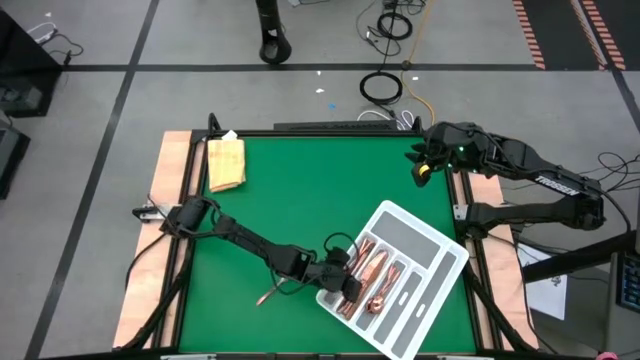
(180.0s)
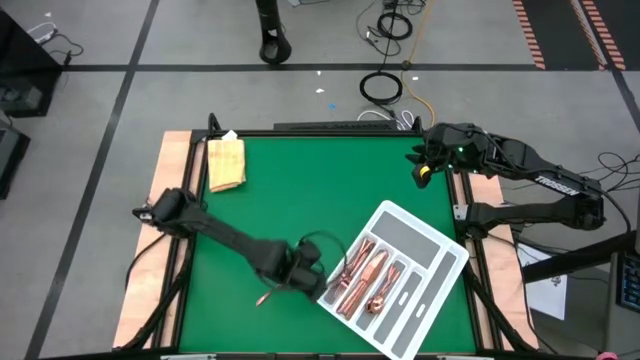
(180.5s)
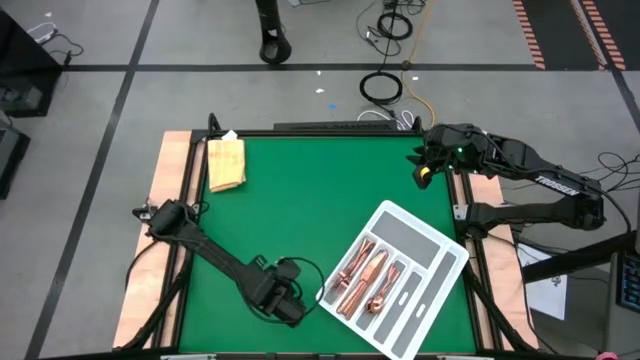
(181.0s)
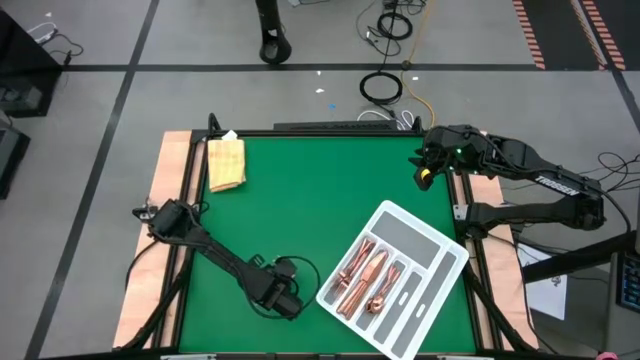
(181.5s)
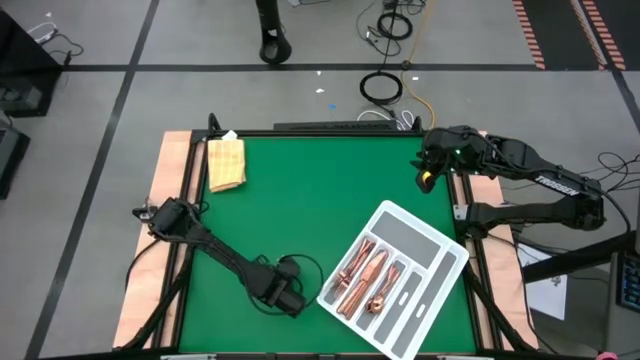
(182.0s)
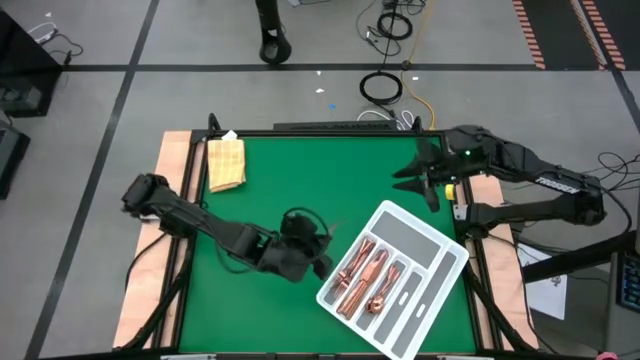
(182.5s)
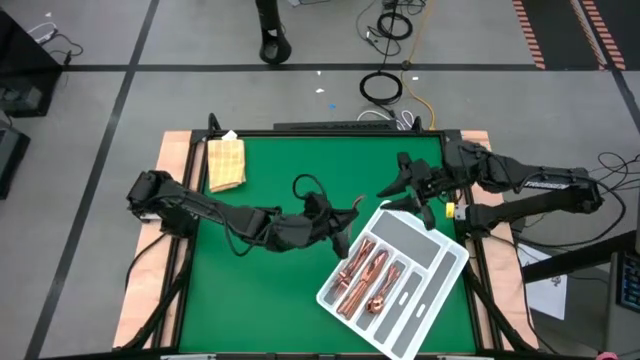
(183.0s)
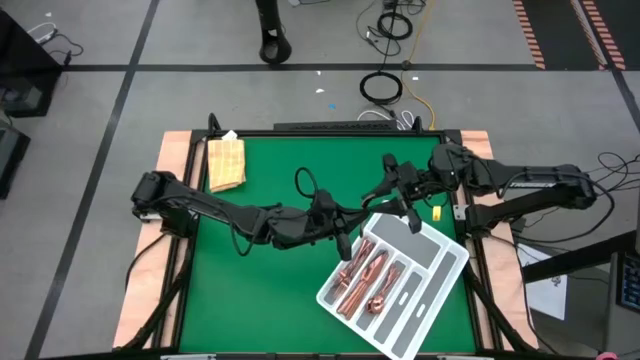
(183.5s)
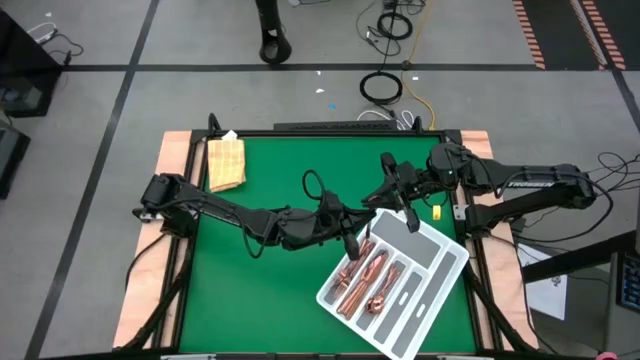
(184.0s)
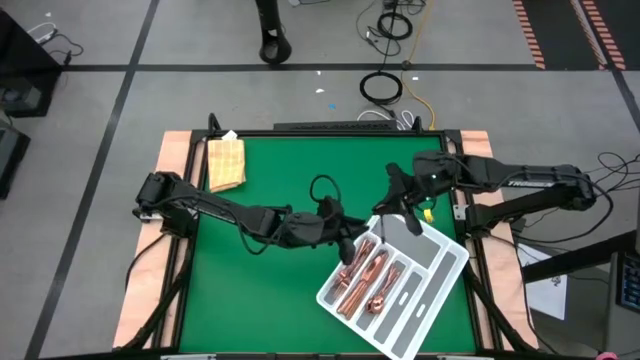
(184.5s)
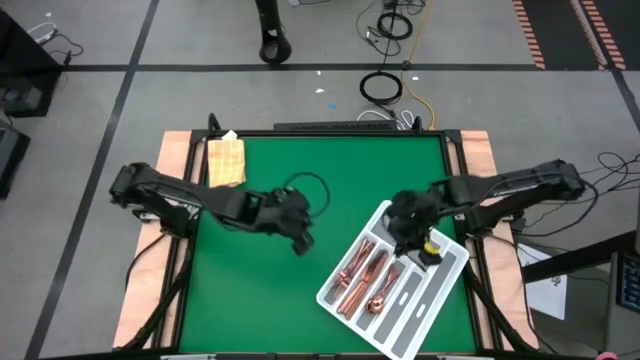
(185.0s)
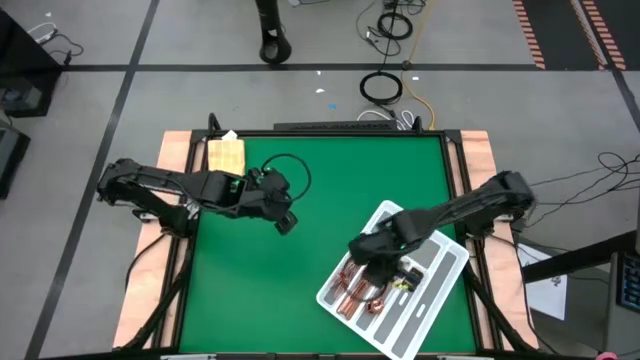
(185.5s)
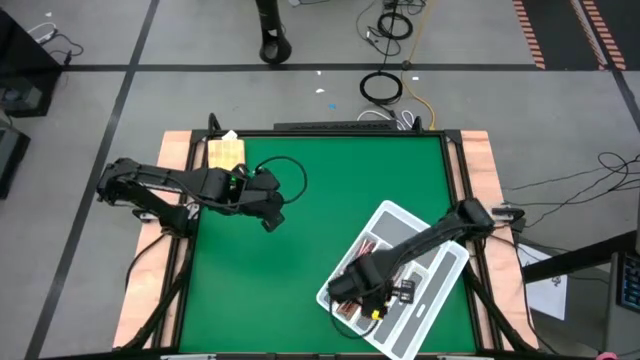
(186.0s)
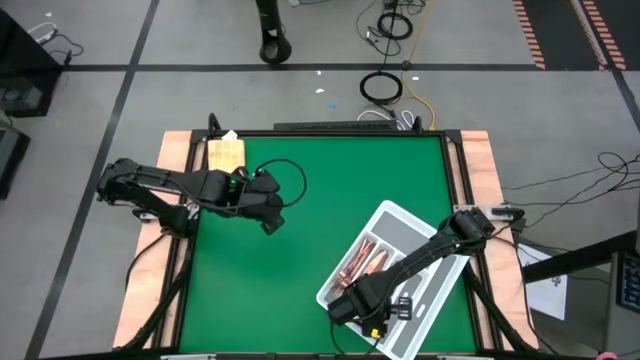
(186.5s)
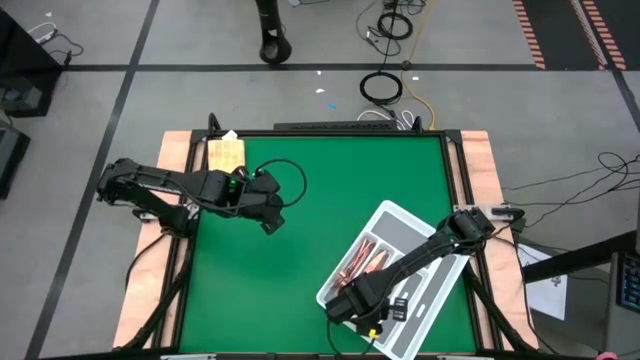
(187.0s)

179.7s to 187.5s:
Task: Sort silverware
Put the bronze spoon into the silverware tray

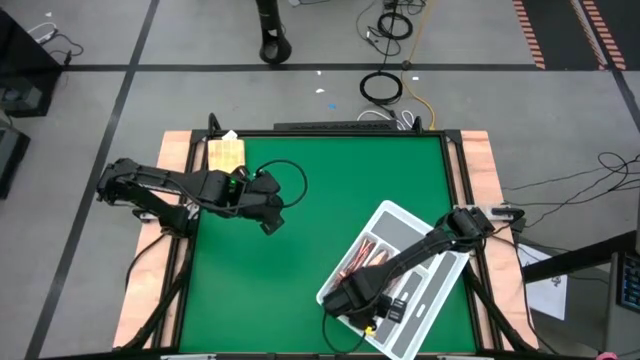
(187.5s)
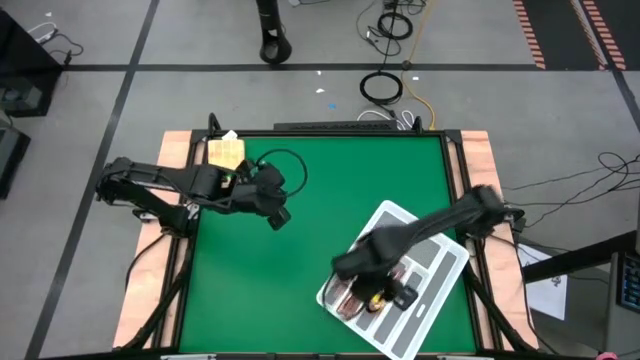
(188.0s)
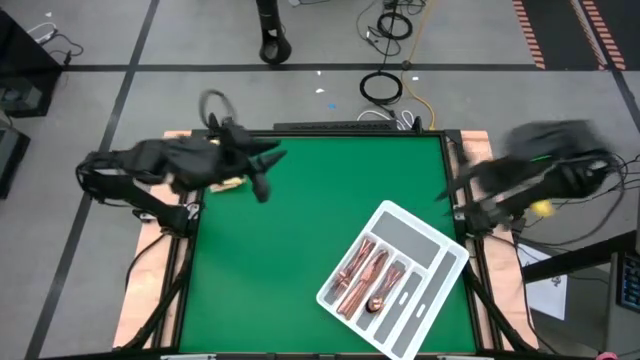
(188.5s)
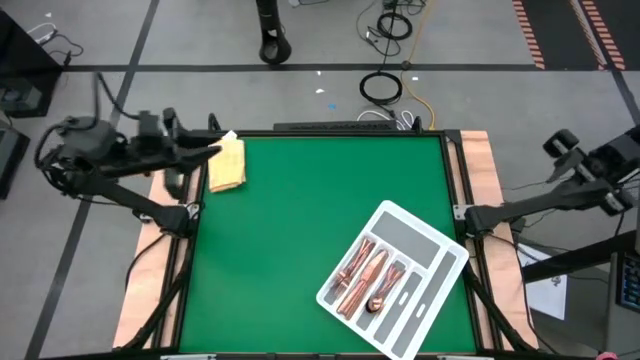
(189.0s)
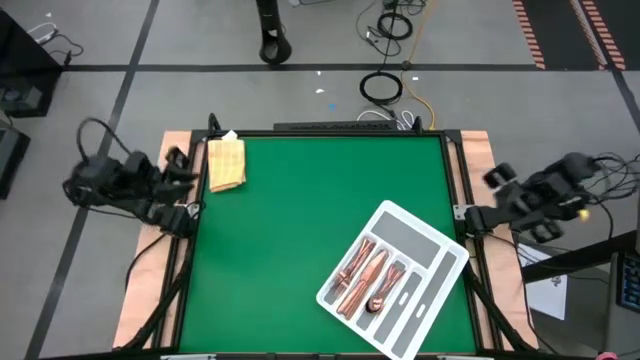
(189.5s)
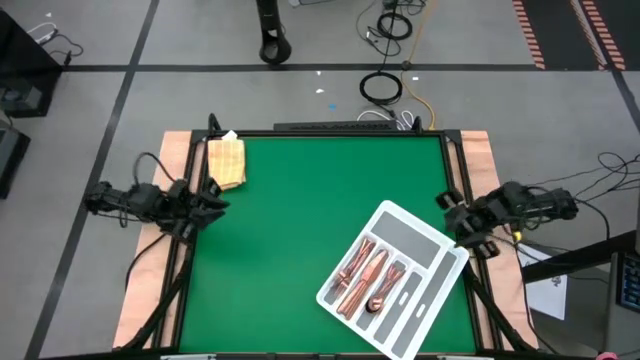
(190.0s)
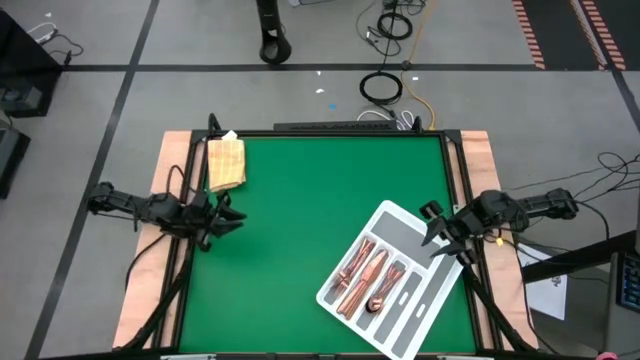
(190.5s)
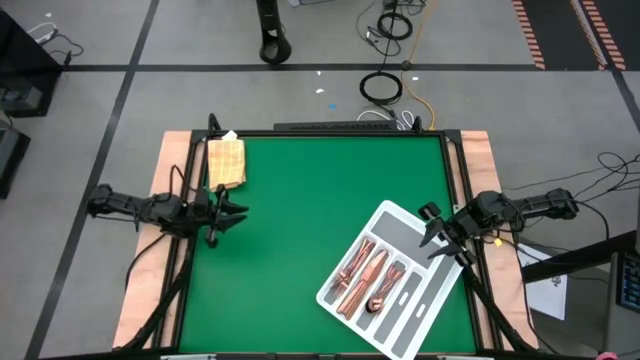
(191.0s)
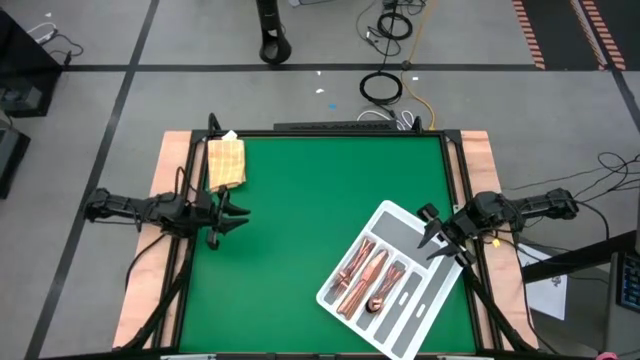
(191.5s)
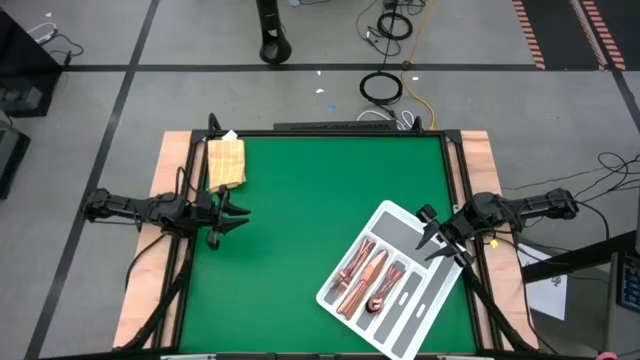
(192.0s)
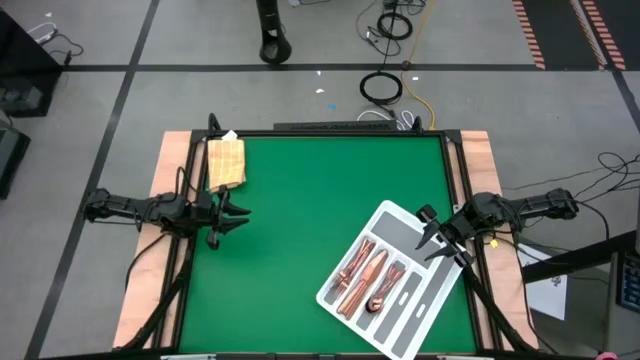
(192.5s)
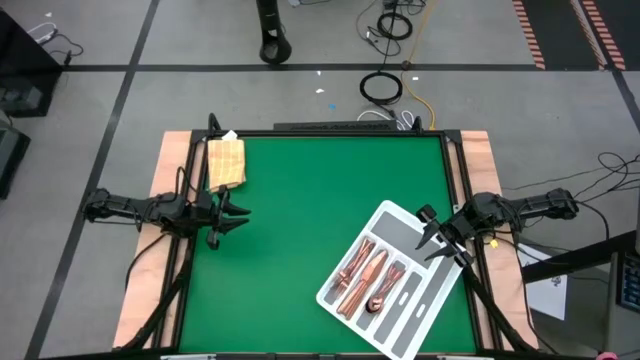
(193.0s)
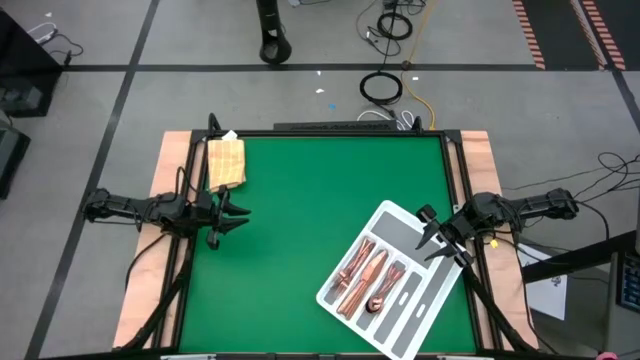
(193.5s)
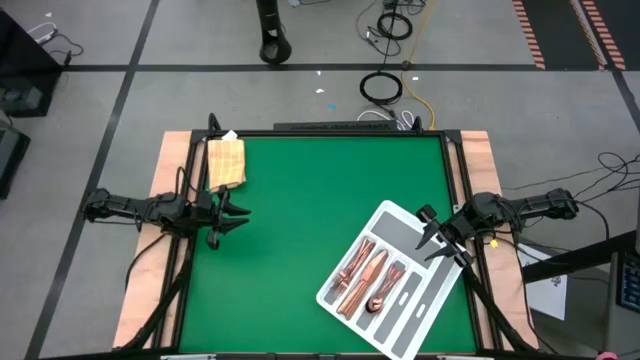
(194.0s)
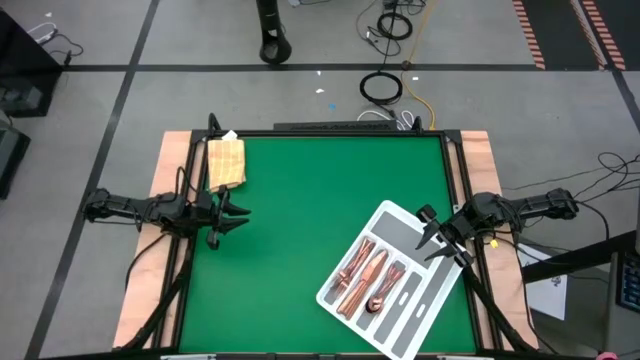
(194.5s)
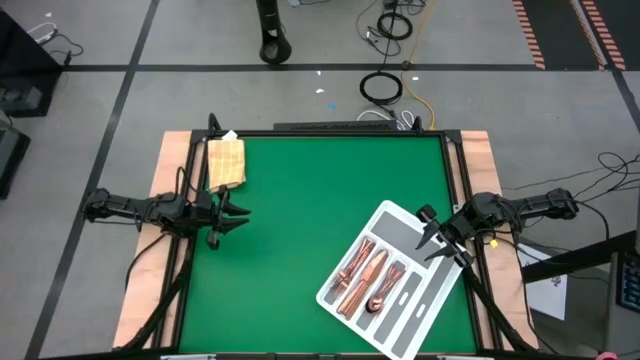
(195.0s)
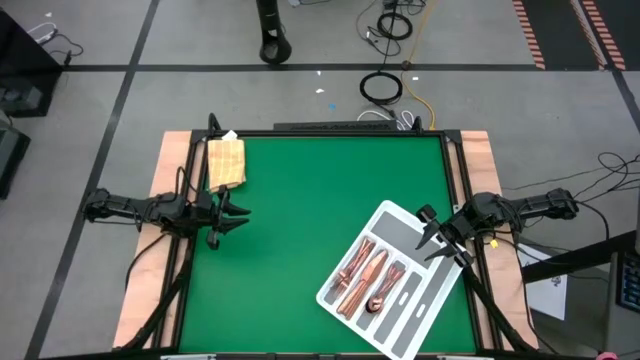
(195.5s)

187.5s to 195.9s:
Return to Home Position

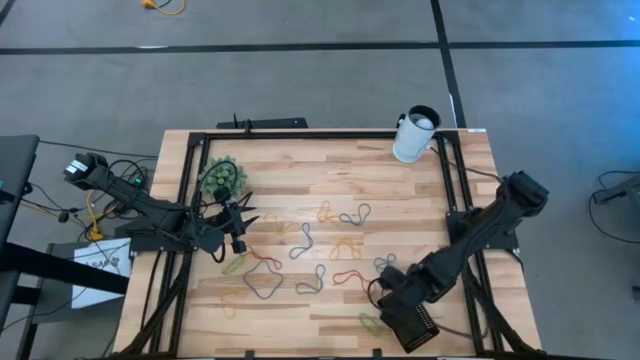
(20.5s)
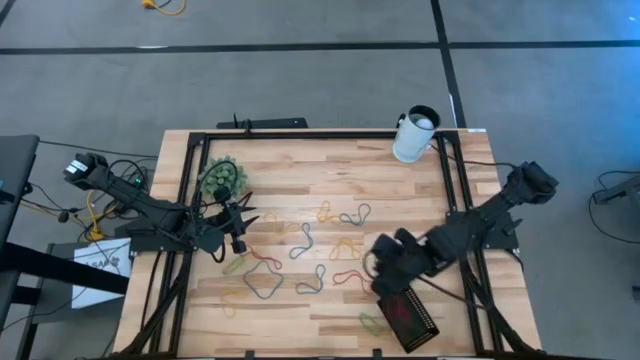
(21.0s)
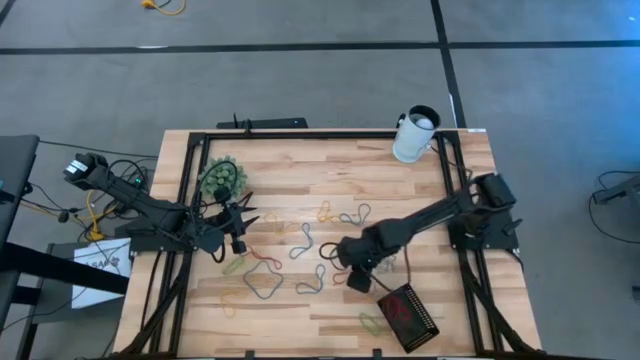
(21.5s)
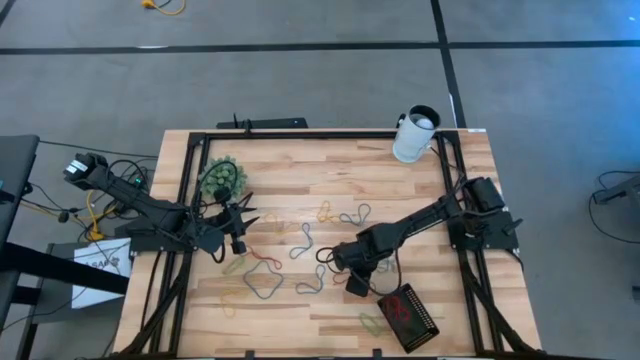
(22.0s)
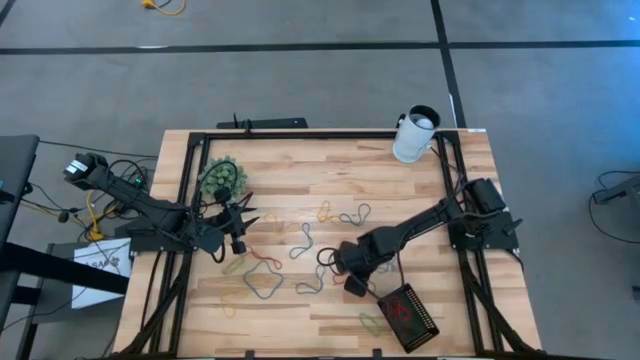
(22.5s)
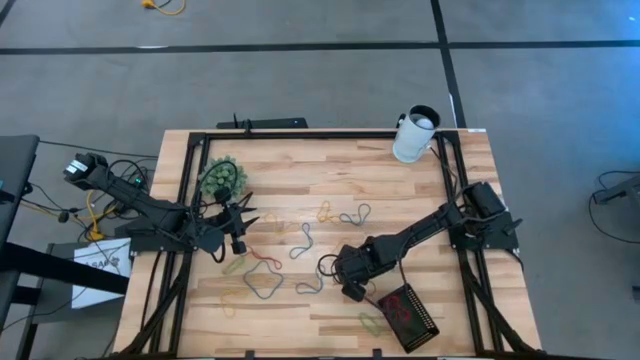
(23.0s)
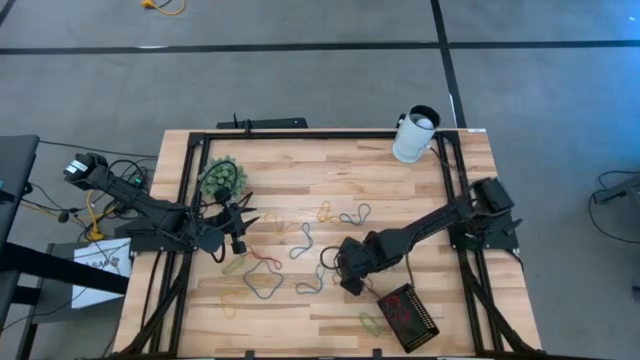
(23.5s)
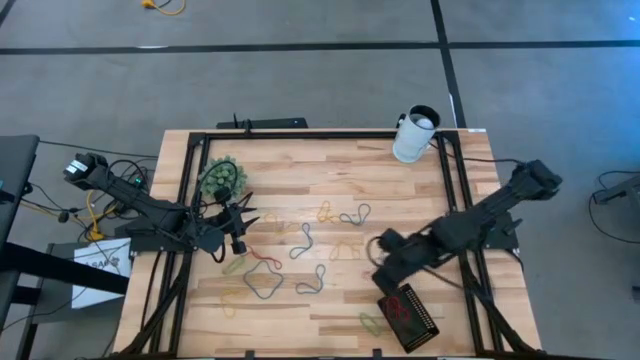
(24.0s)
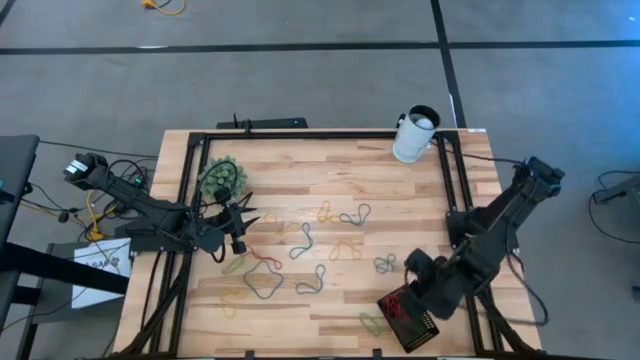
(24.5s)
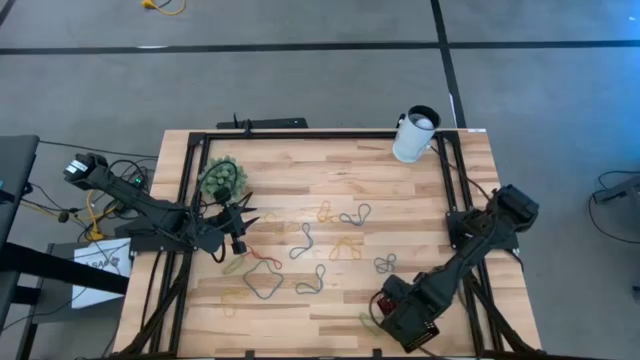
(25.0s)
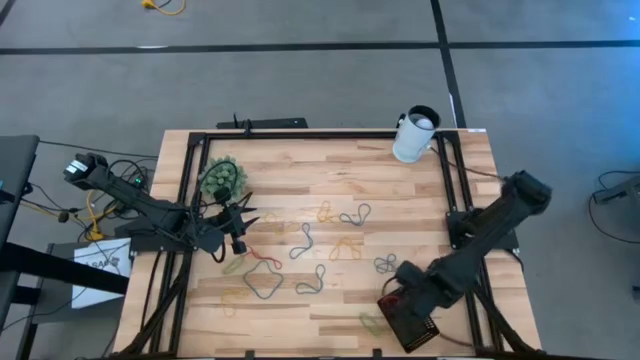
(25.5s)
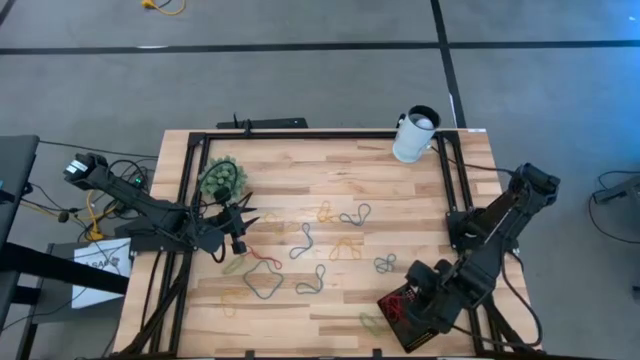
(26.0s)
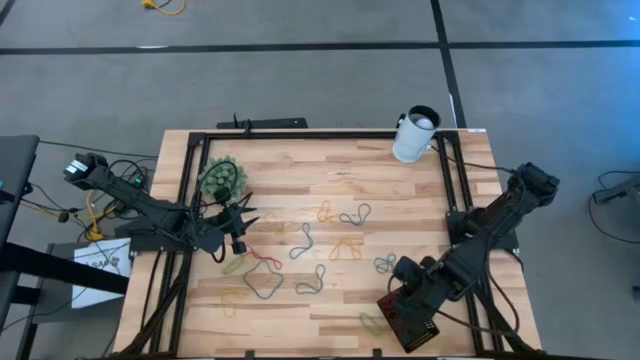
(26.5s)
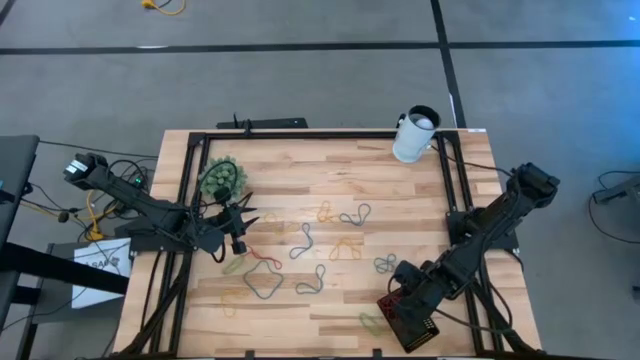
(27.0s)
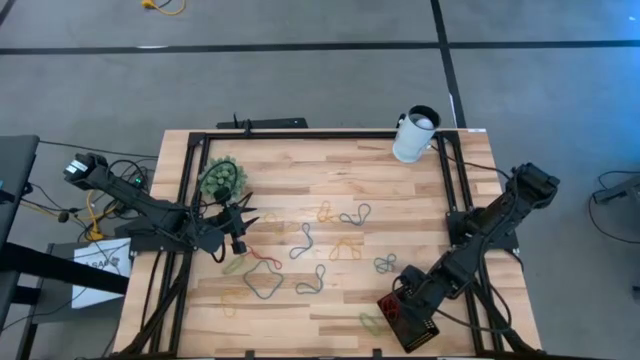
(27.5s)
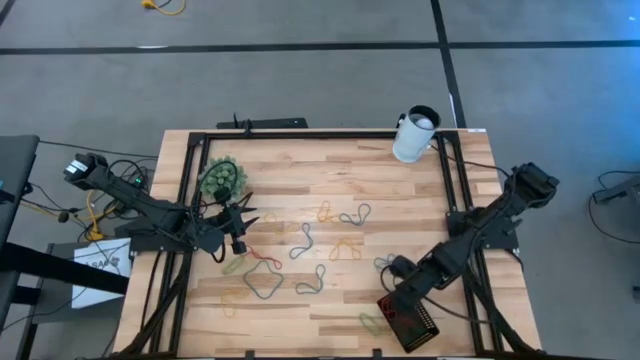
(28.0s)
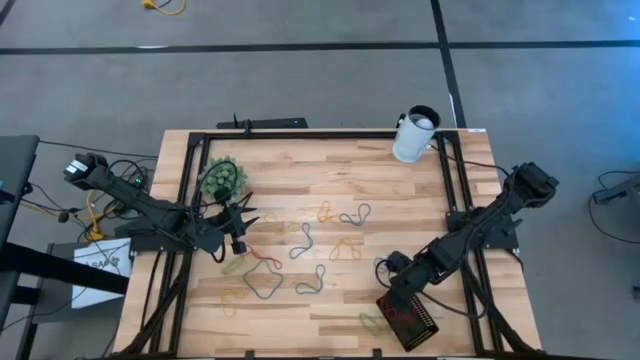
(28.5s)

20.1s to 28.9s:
Task: Pick and place rubber bands into bin
Put the red rubber band into the black basket
